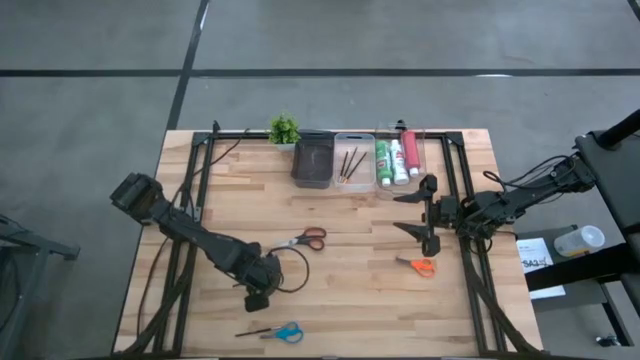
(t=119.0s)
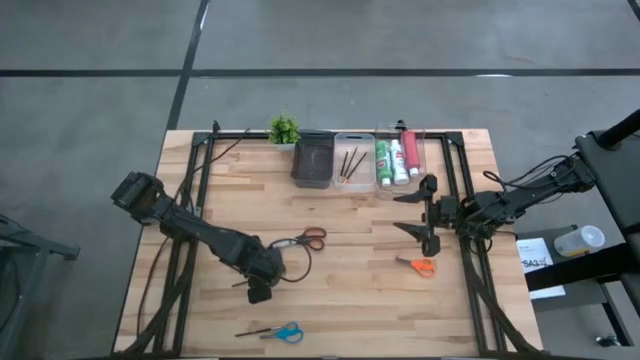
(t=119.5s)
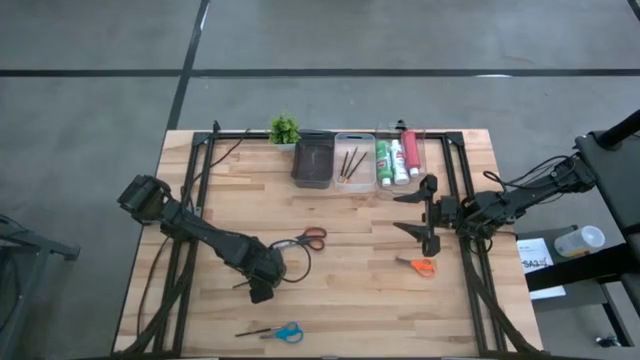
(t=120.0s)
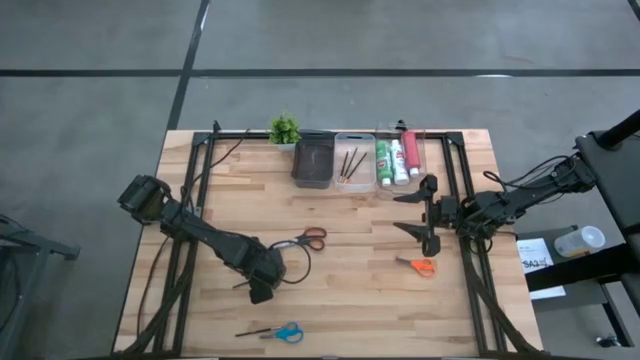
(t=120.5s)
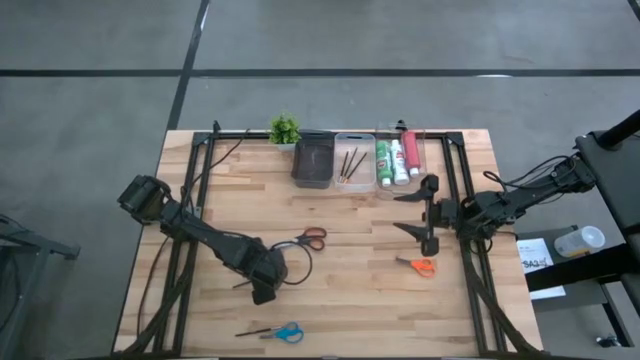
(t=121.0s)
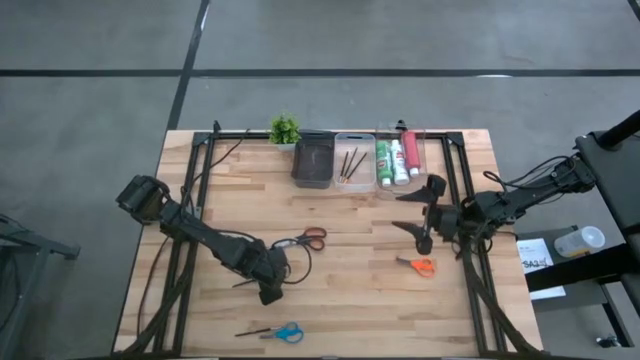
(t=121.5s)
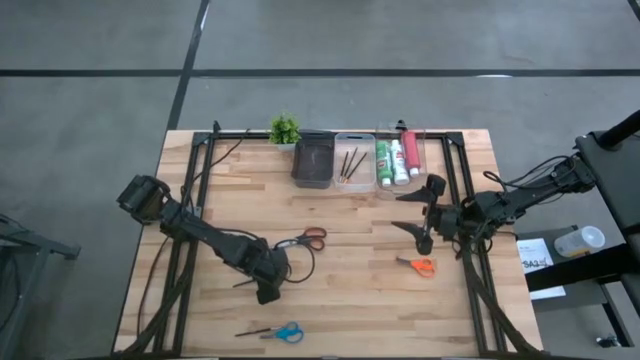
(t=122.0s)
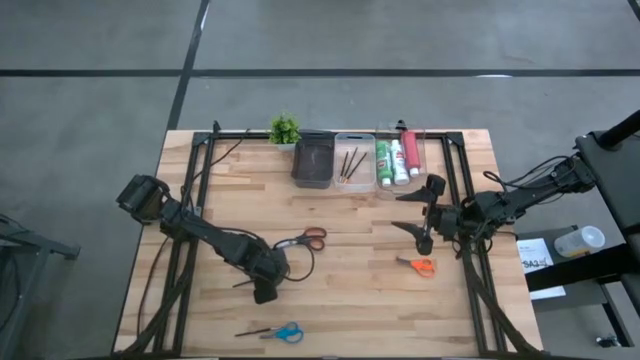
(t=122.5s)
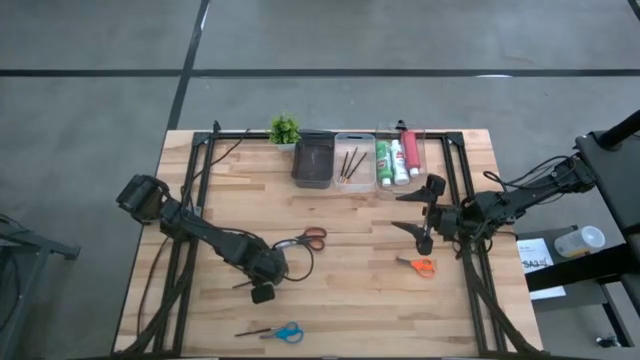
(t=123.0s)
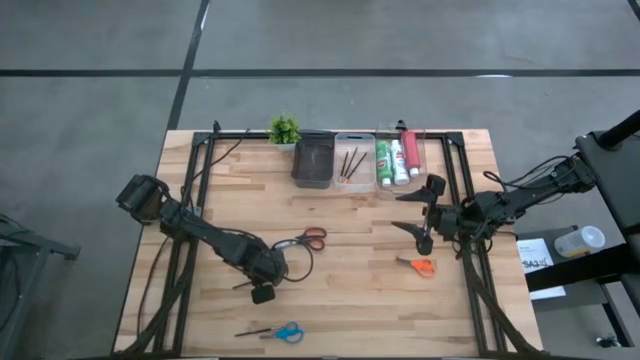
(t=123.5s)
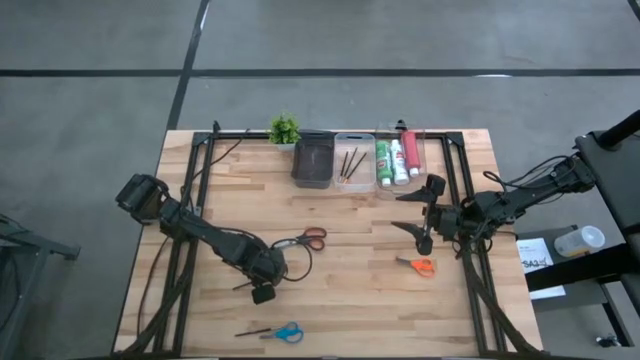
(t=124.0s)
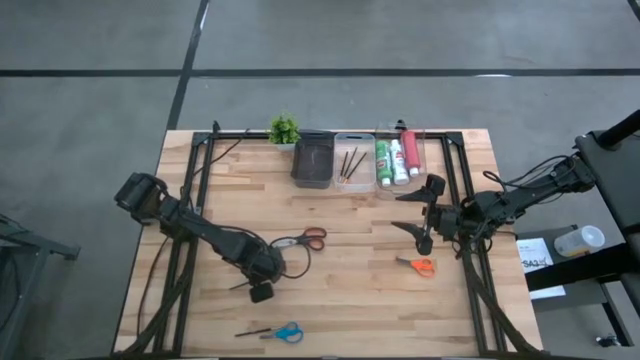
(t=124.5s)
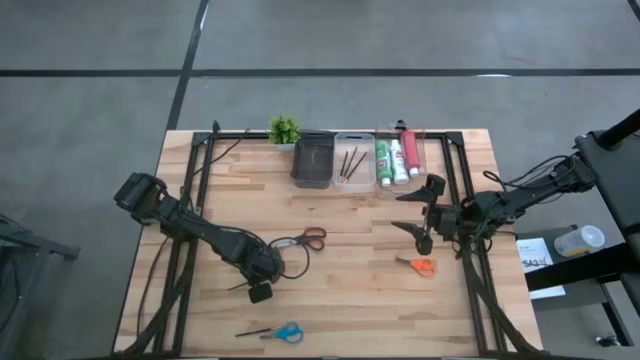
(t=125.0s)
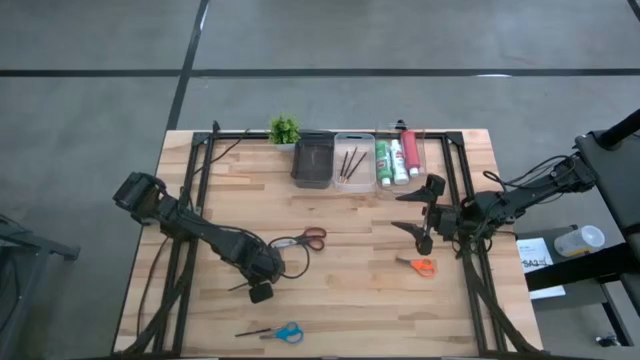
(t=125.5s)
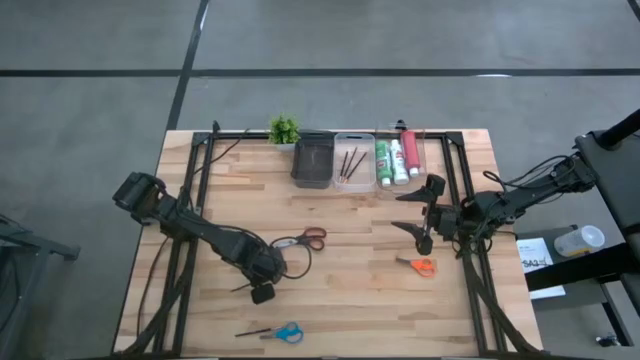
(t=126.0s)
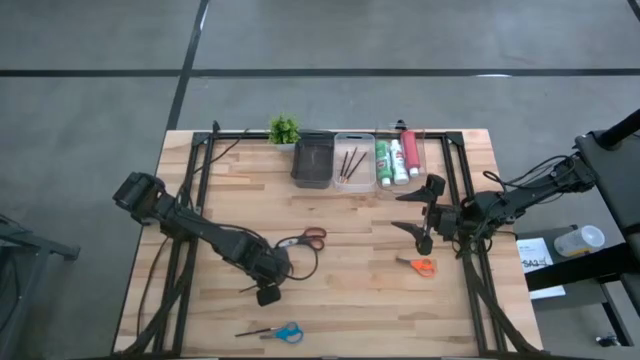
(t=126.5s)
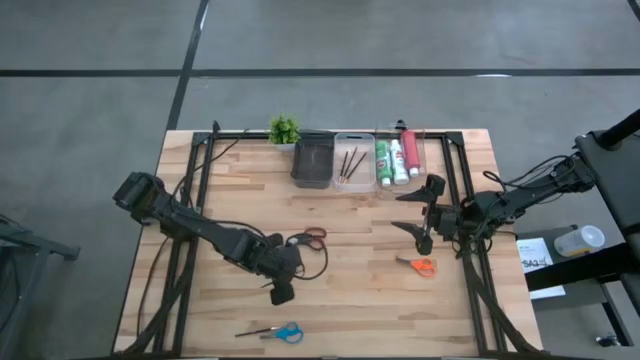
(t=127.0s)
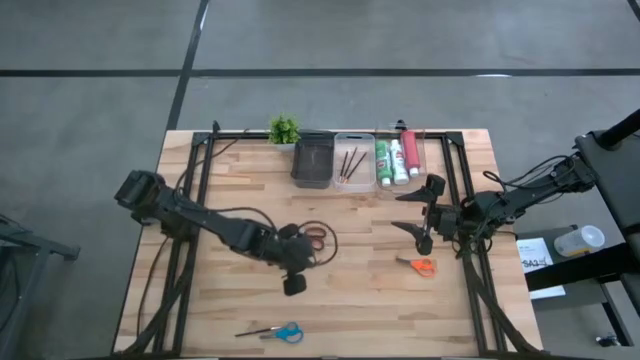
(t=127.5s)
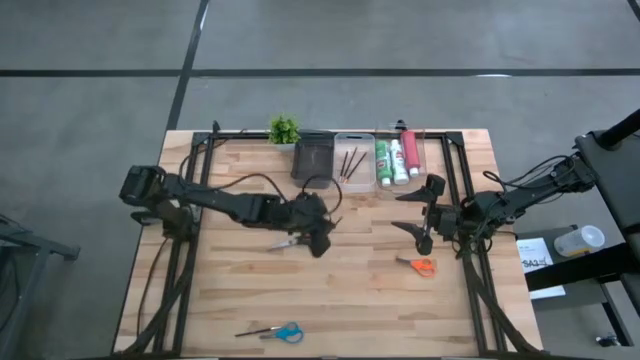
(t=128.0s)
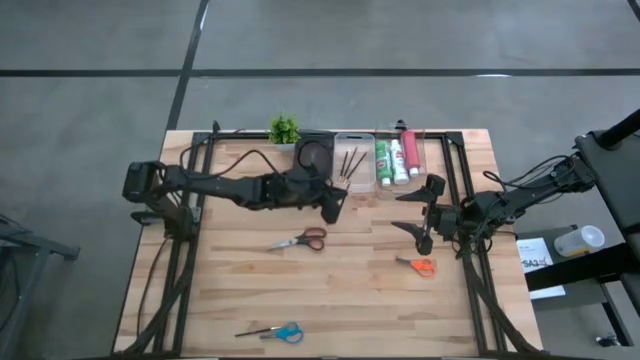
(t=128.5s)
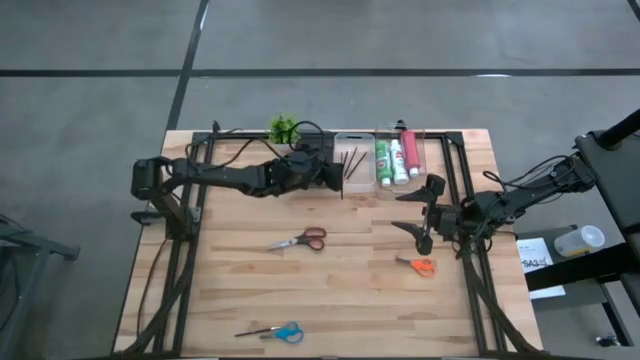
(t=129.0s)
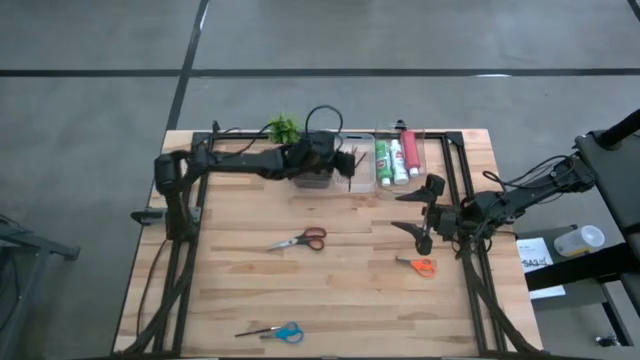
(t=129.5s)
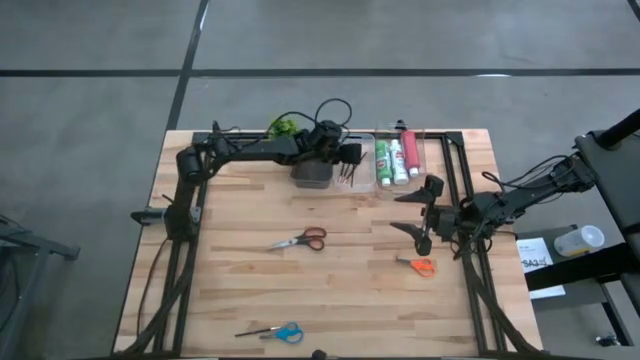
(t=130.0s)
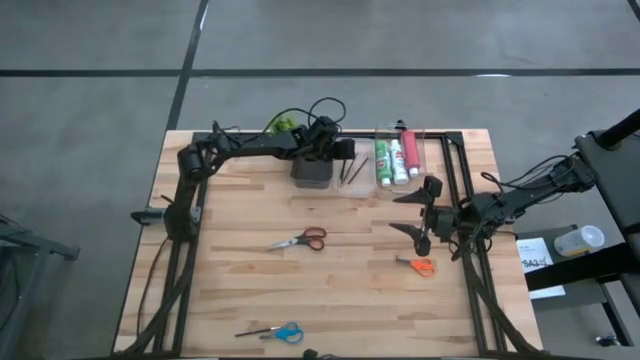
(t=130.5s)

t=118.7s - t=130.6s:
Task: Pick & Place Paint Supplies
Put the top silver paint brush into the white transparent bin

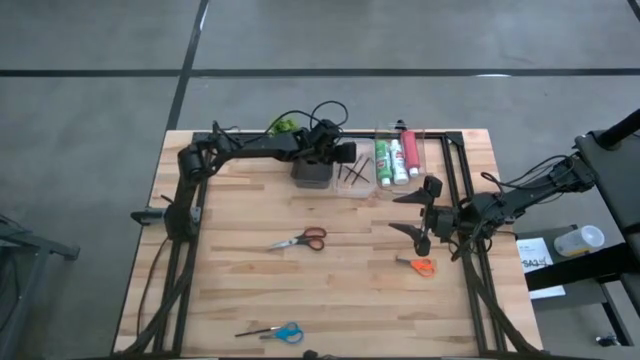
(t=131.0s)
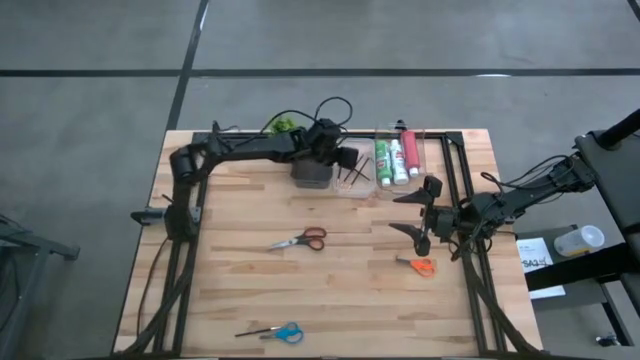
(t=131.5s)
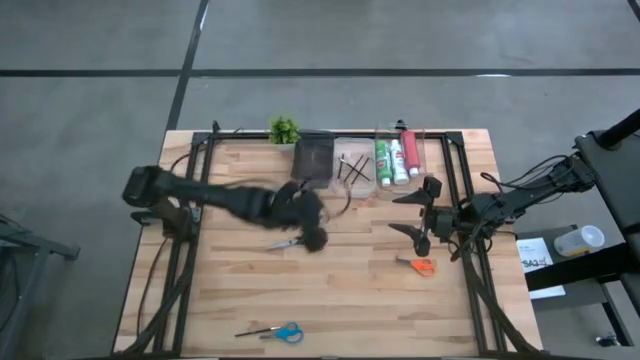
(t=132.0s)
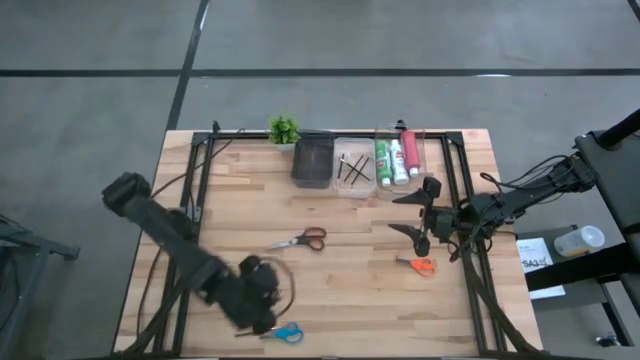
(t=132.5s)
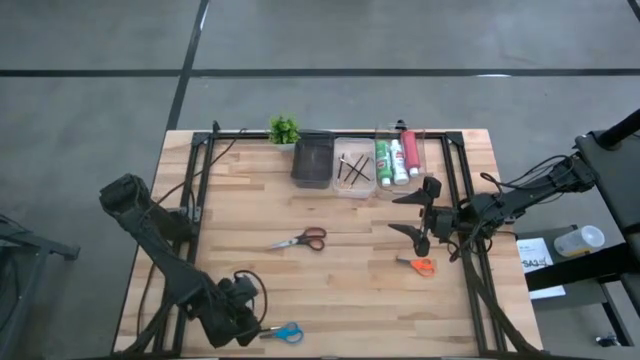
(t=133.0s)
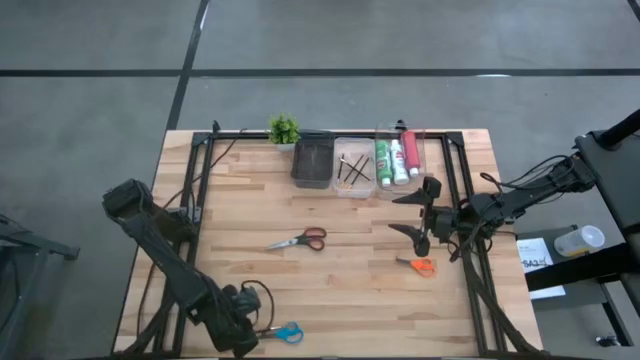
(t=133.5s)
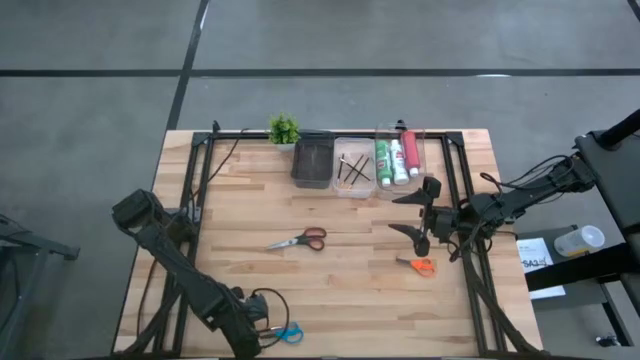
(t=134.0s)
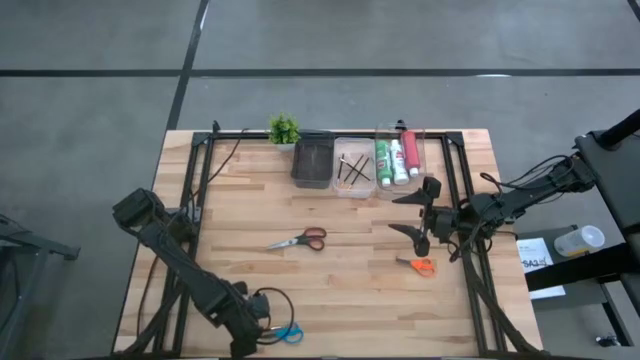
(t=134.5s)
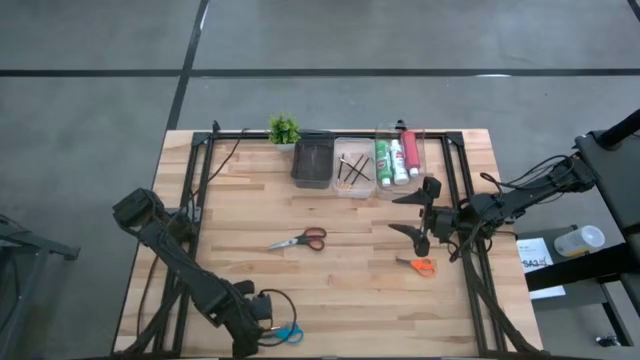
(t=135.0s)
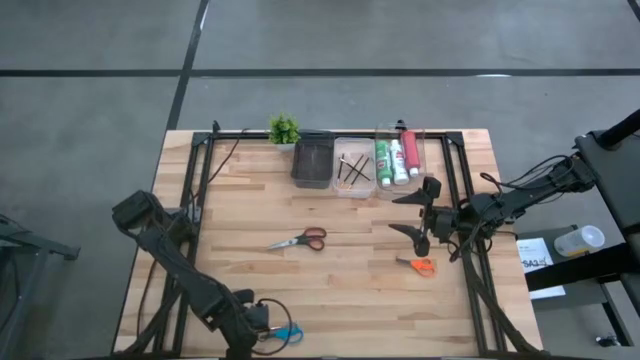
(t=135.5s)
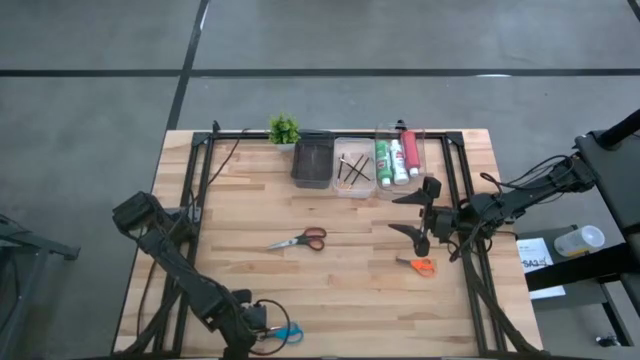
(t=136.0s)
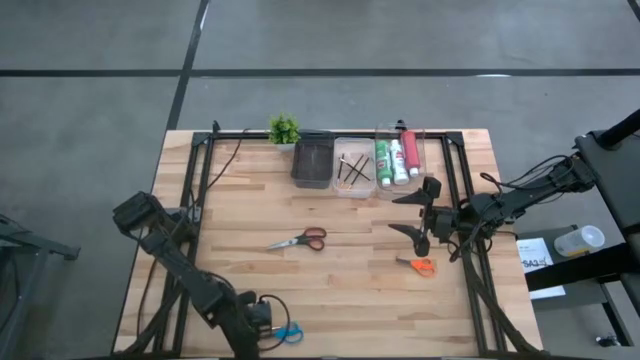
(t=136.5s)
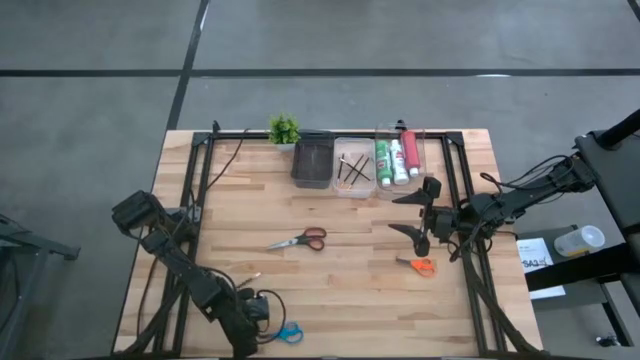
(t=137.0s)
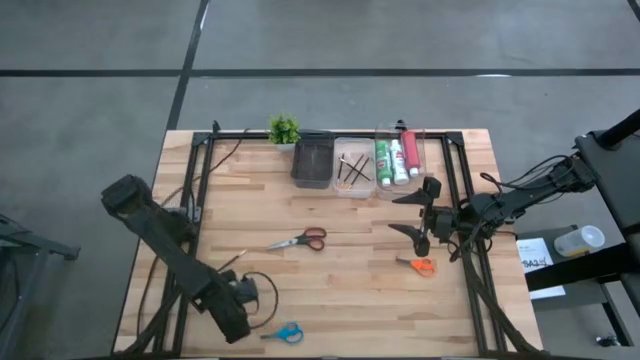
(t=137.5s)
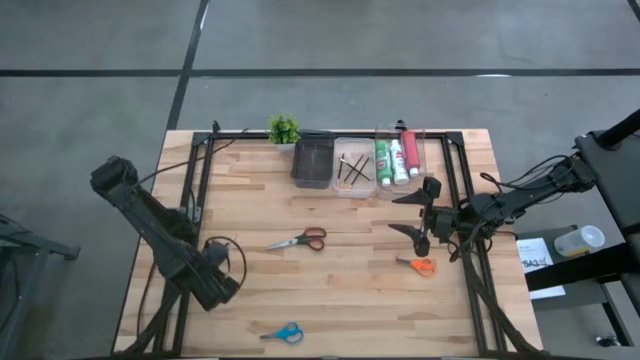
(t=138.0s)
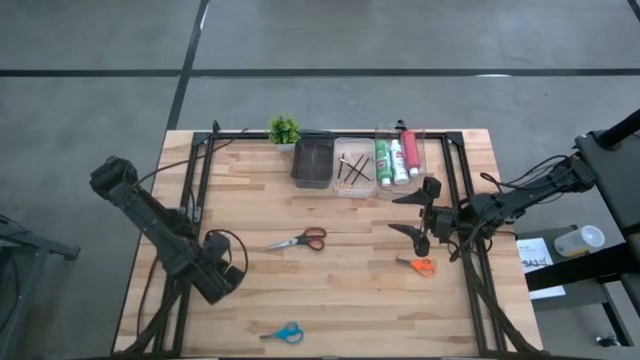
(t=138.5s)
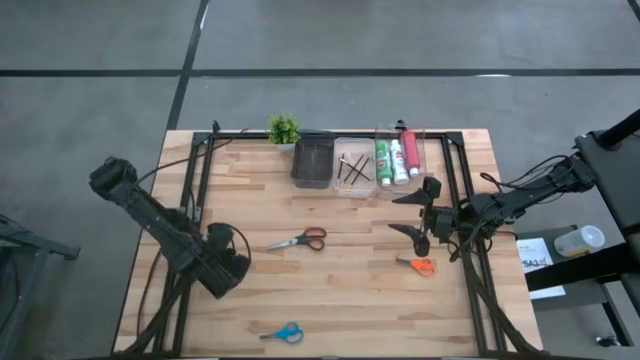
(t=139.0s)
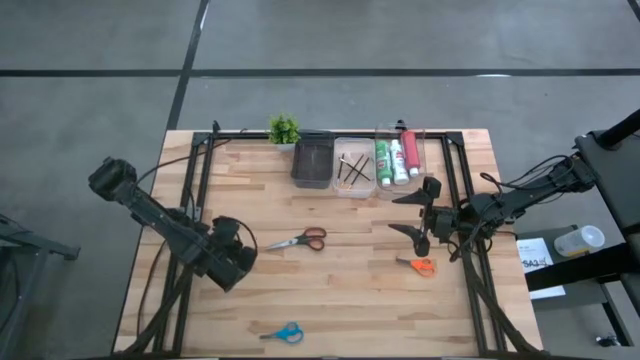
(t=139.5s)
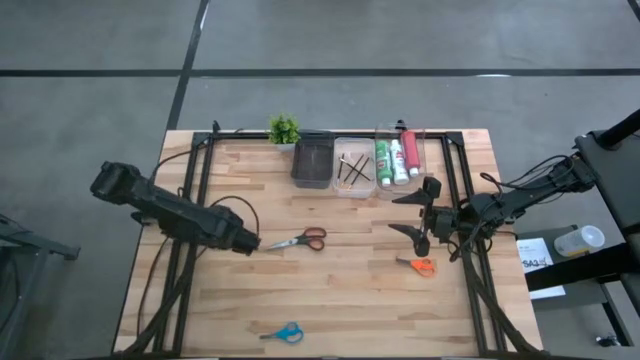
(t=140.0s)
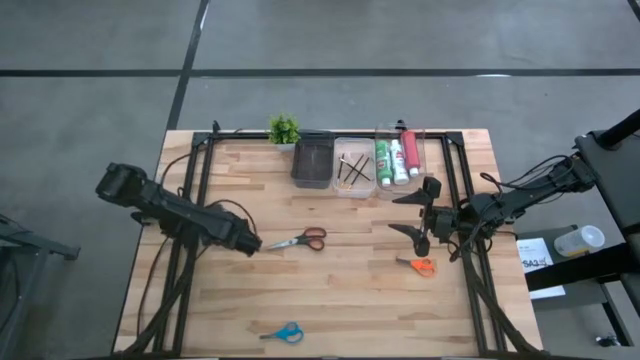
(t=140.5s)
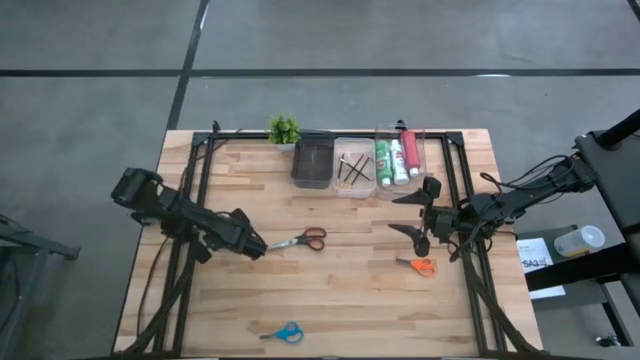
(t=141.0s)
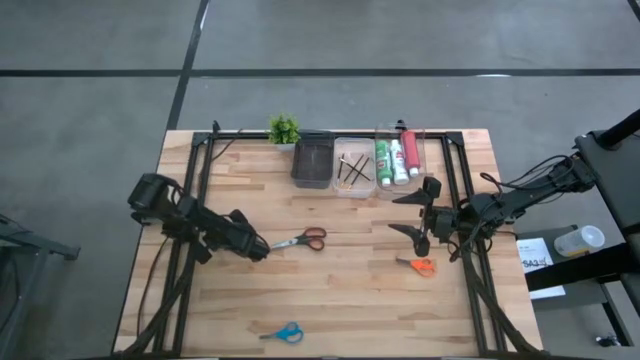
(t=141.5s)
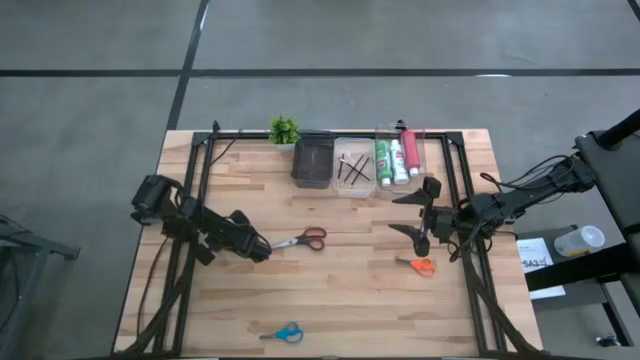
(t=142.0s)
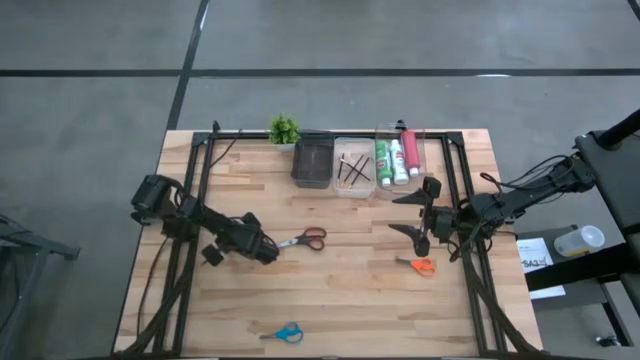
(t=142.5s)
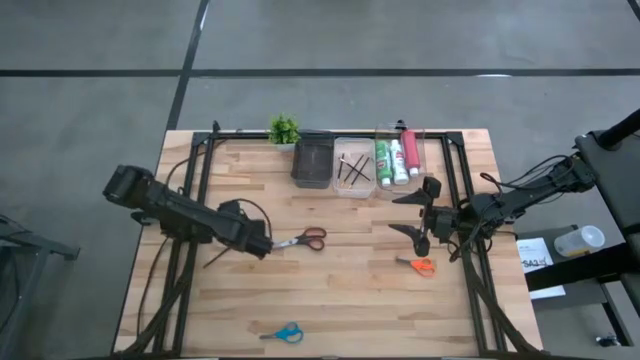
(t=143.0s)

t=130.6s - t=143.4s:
Put the silver paint brush into the white transparent bin
